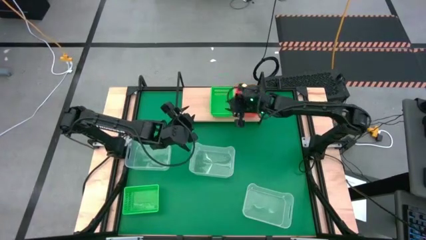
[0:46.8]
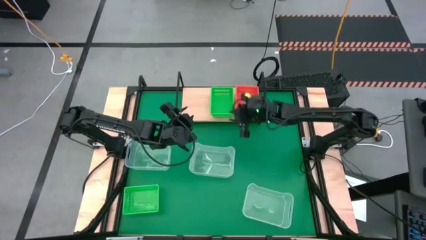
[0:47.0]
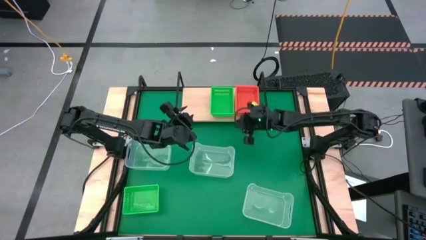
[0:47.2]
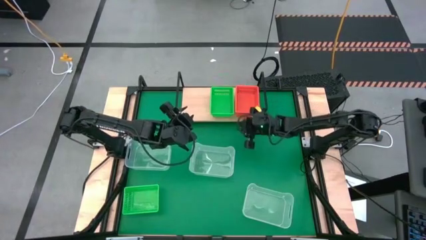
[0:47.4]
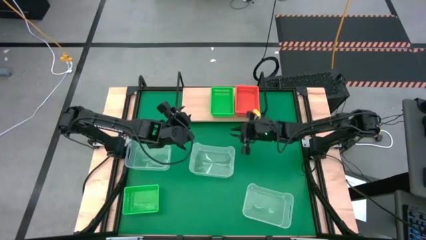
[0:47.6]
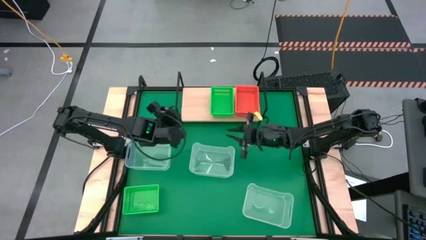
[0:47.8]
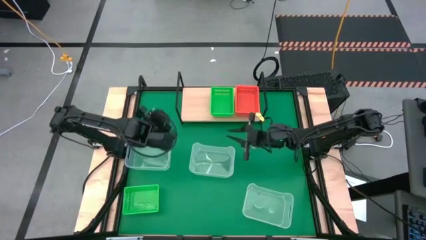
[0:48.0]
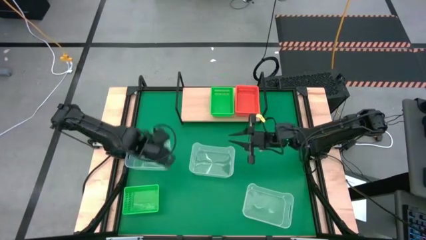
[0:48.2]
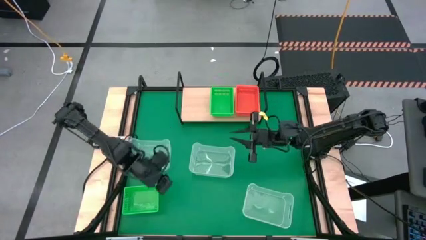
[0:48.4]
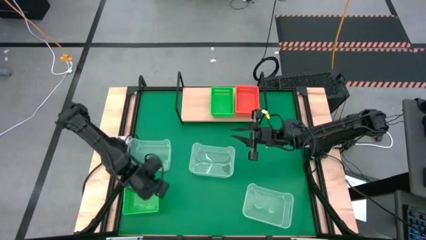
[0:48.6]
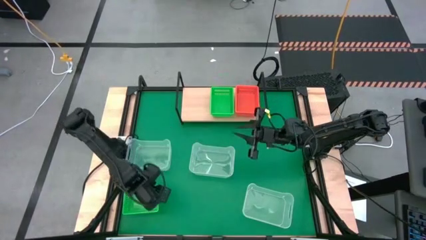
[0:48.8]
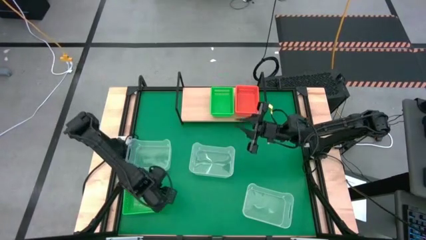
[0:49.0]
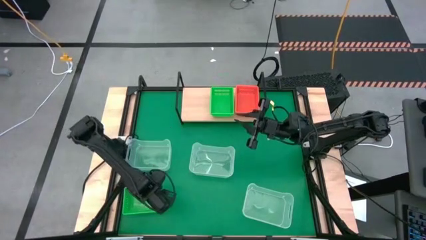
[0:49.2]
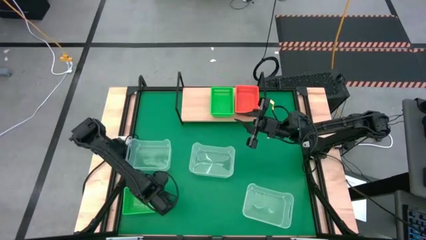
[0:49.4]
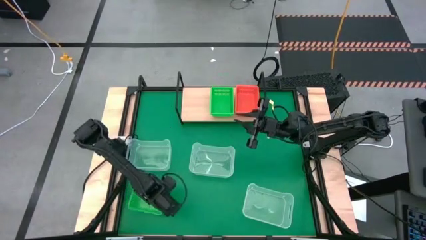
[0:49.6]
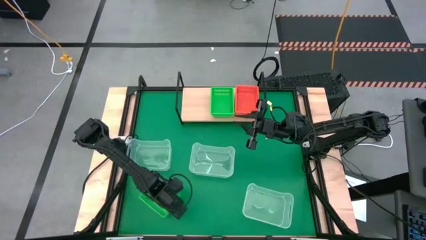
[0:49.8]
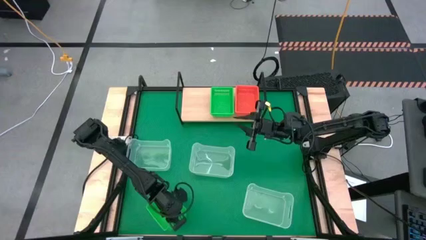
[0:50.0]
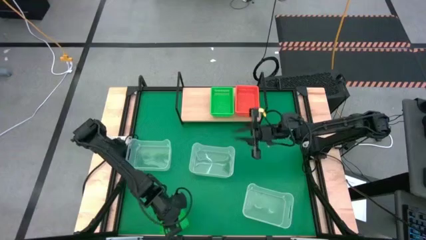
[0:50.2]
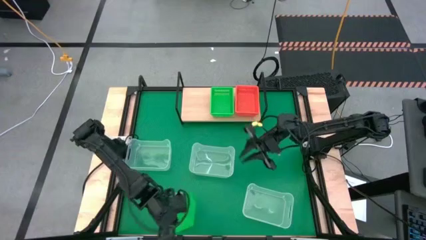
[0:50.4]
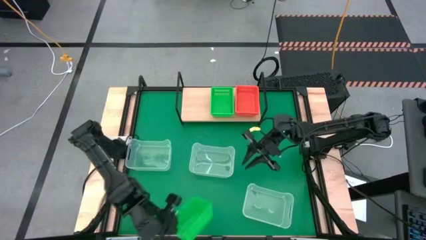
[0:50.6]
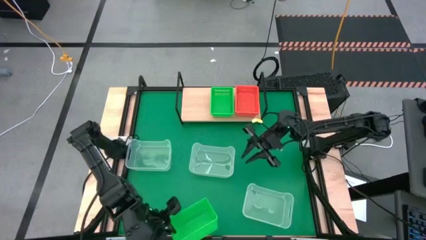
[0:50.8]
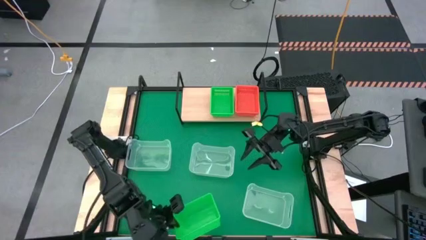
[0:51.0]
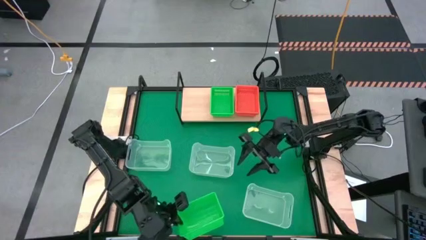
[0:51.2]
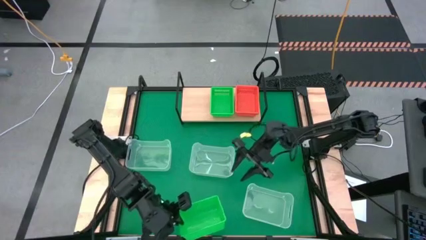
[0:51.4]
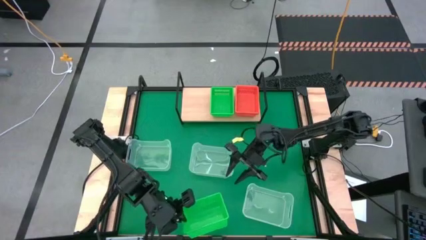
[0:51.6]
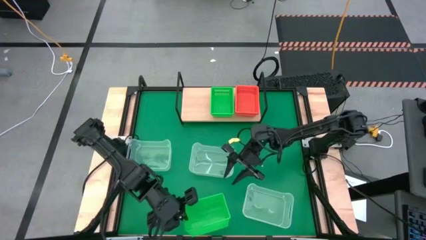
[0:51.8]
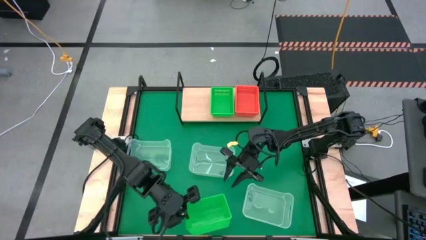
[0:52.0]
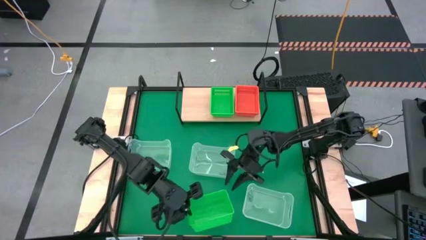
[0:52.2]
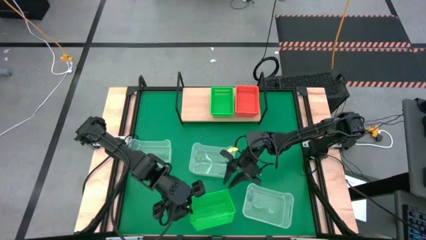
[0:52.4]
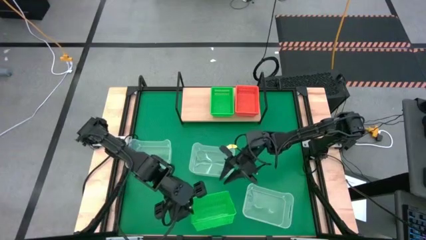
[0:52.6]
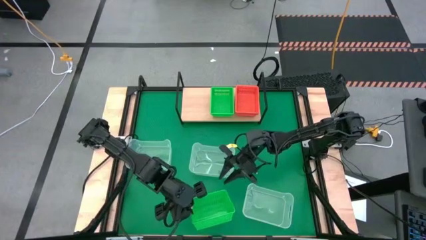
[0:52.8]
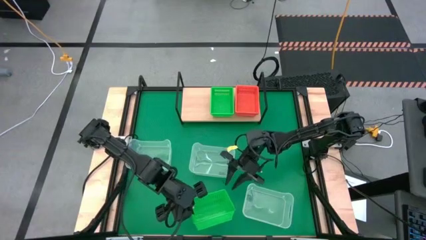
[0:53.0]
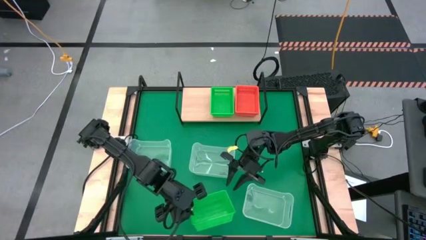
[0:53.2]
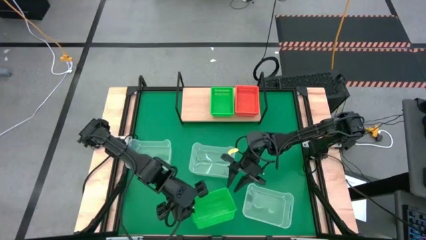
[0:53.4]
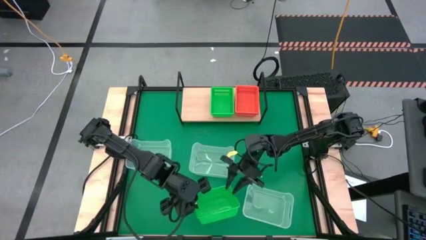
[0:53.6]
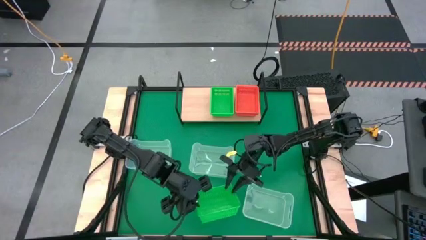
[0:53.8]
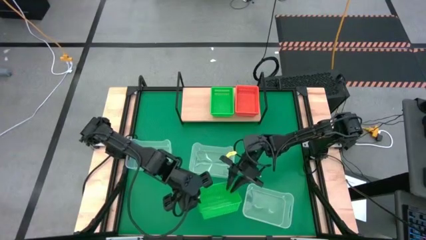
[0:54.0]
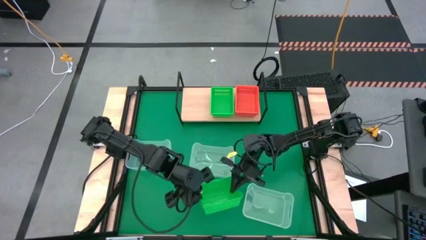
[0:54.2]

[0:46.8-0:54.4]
Task: Stack baskets on shelf by color
Stack the green bin on top of the other green bins on the shelf

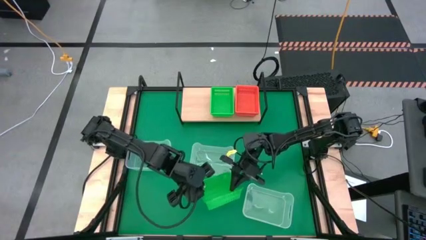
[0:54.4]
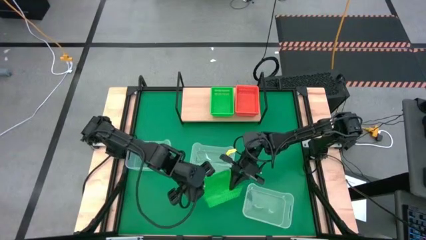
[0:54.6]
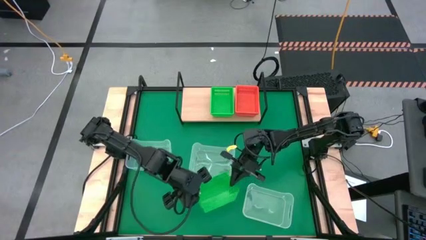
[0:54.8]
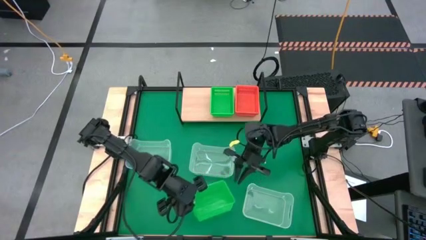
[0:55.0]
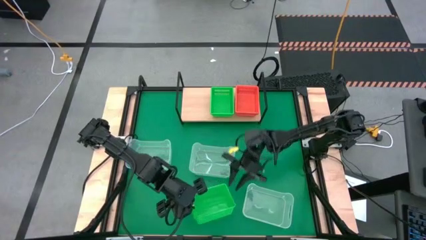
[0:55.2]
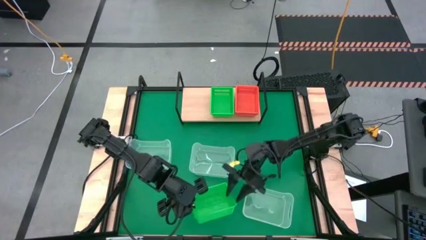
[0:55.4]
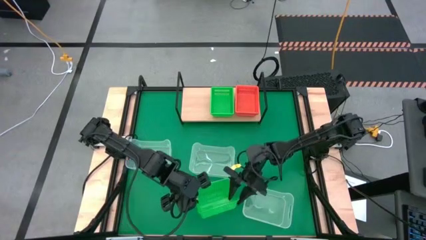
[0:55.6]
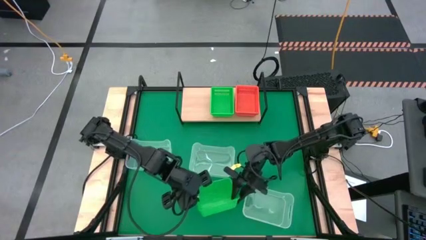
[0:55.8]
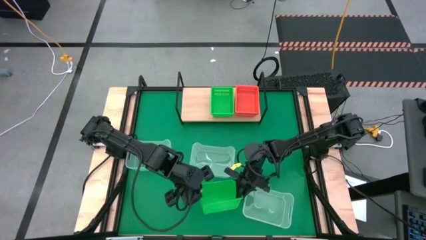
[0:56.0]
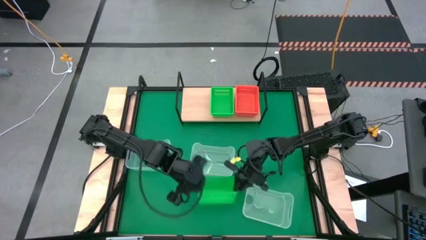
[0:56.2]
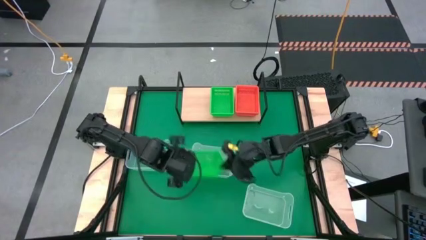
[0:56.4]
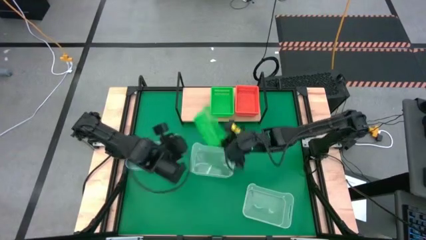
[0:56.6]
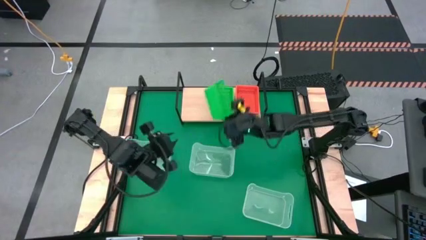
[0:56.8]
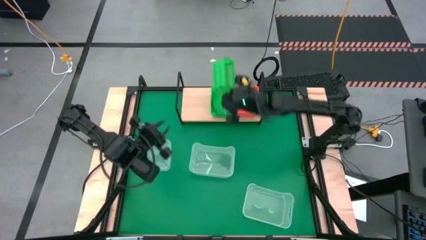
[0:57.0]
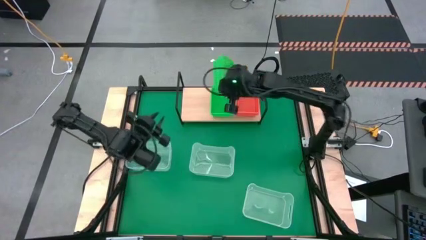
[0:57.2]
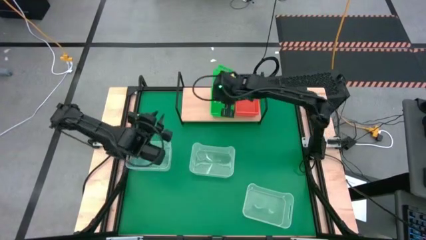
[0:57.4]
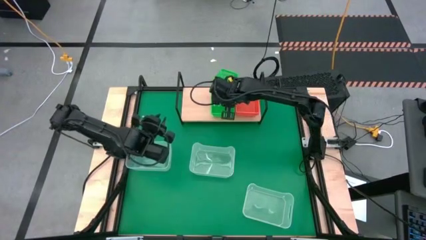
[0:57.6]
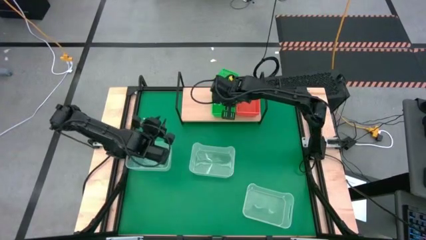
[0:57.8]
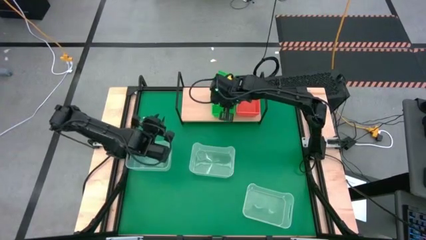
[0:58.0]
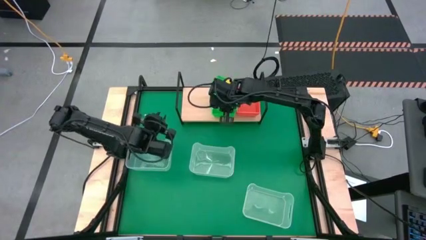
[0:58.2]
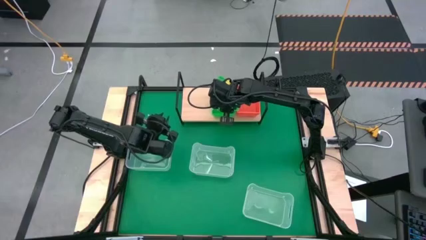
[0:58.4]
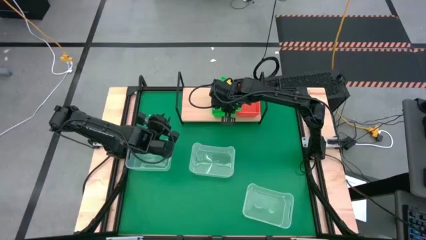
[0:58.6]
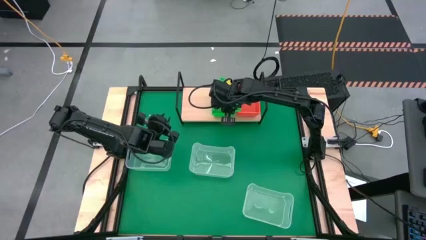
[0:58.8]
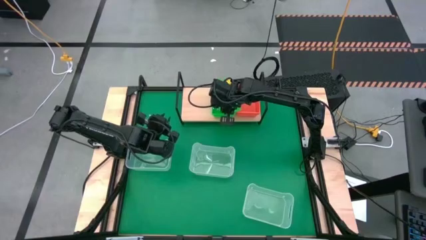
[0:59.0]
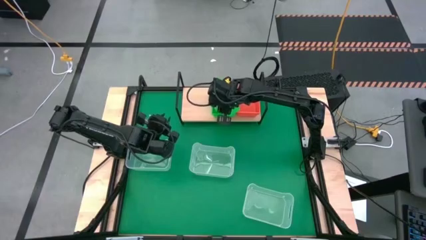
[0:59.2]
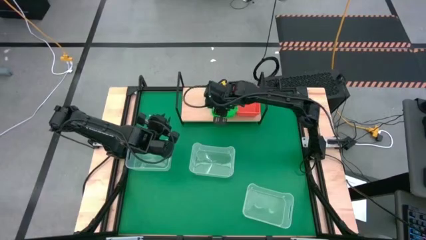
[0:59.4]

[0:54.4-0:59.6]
Stack the green bin on top of the other green bins on the shelf

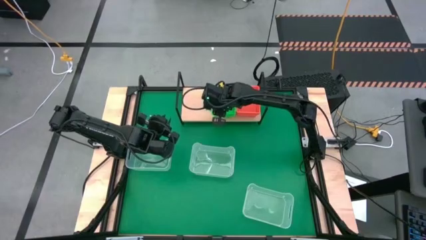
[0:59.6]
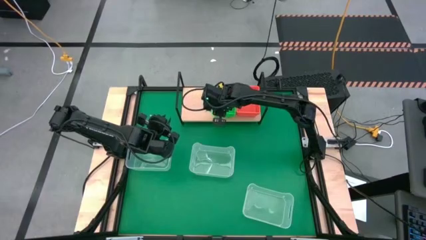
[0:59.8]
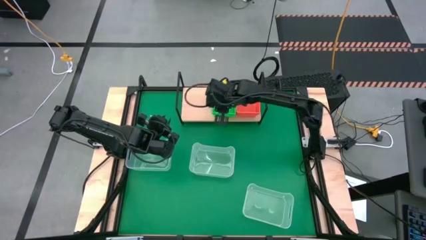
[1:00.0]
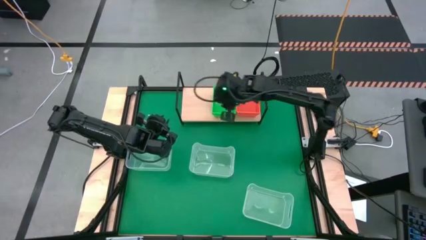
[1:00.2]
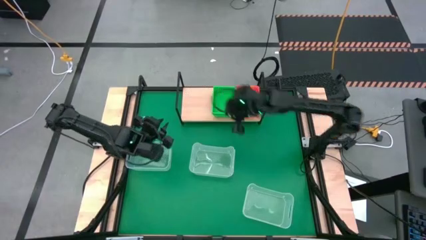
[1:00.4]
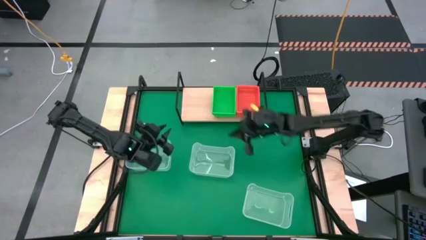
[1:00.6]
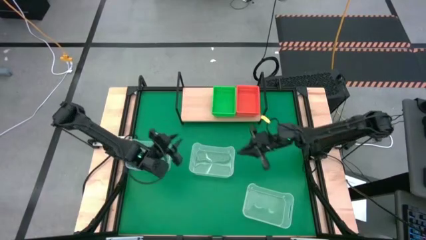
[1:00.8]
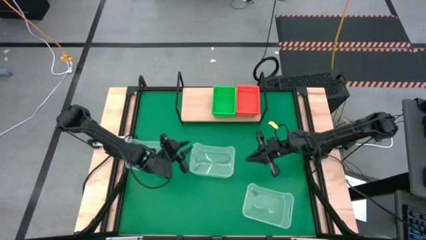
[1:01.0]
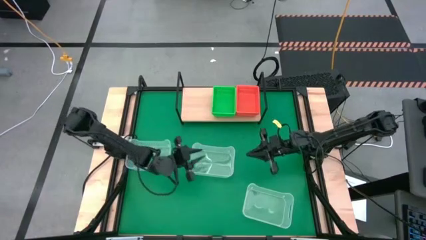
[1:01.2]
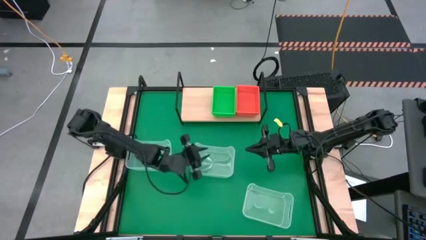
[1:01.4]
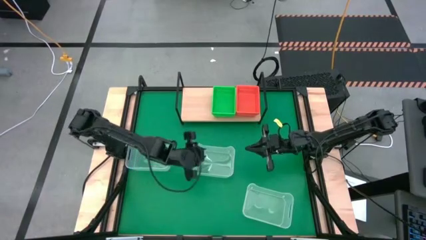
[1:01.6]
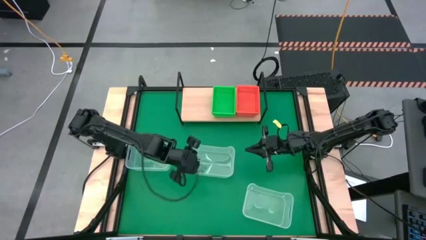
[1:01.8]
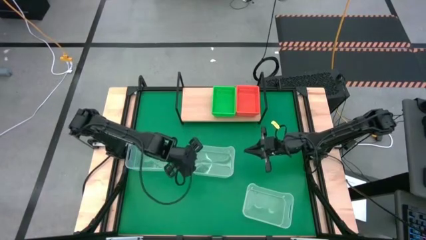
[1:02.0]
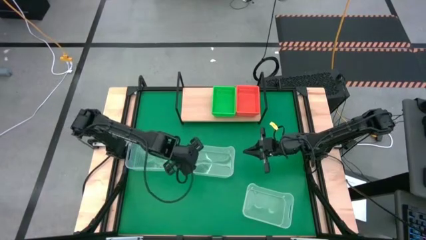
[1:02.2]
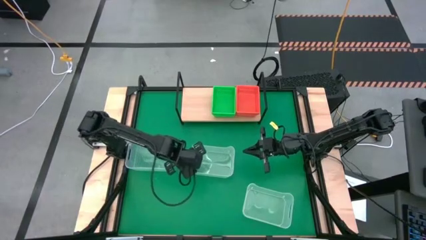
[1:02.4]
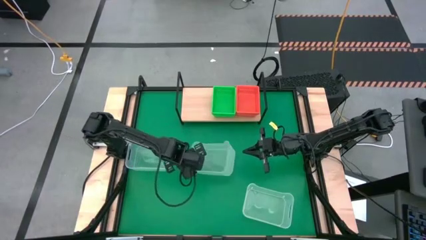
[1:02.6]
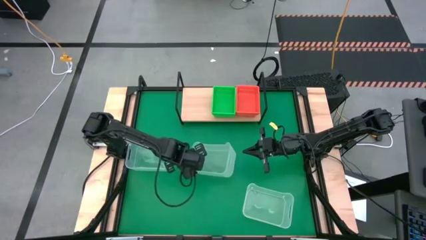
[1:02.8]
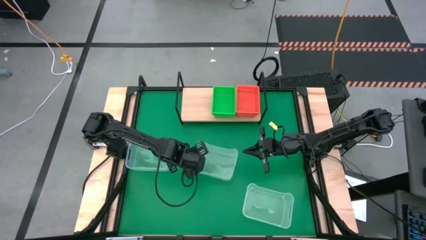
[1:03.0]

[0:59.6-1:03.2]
Put the top left transparent bin on the shelf
